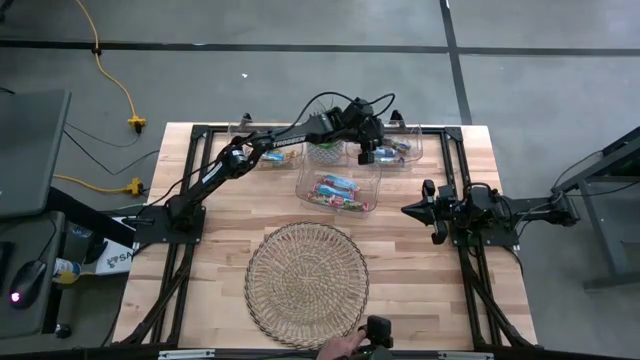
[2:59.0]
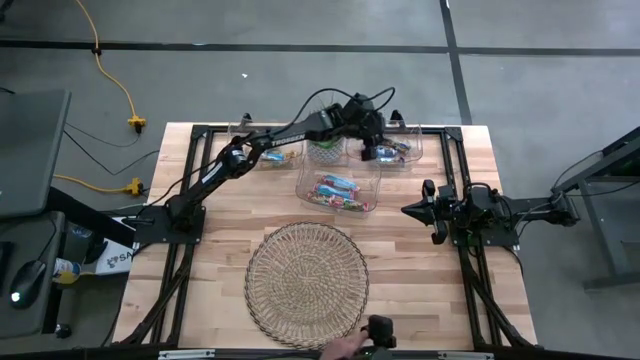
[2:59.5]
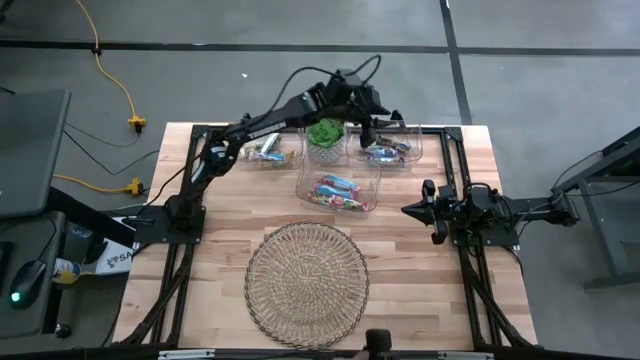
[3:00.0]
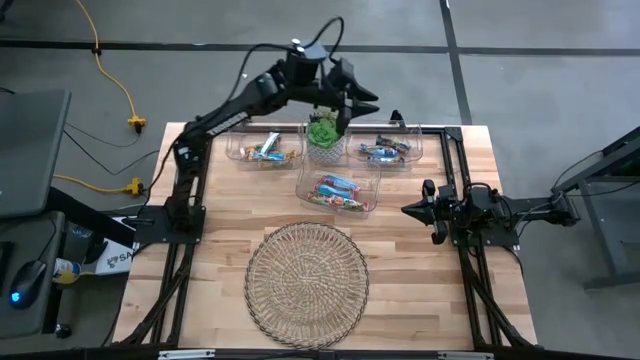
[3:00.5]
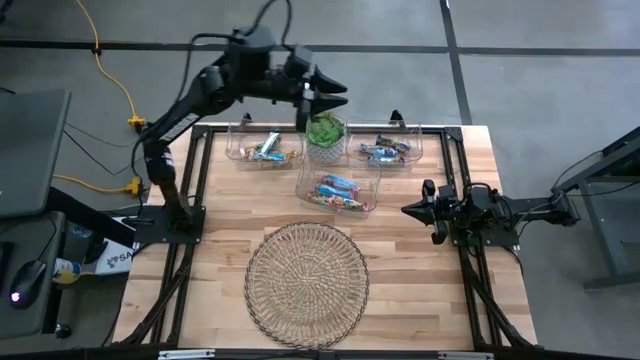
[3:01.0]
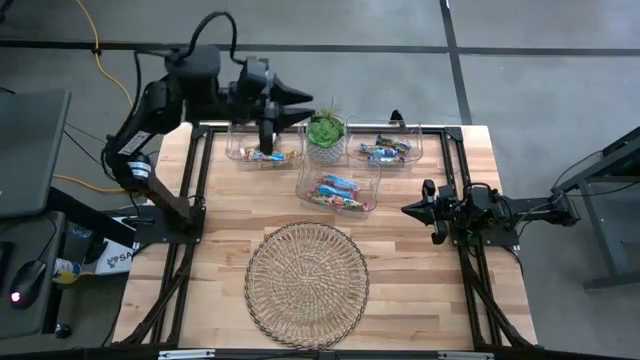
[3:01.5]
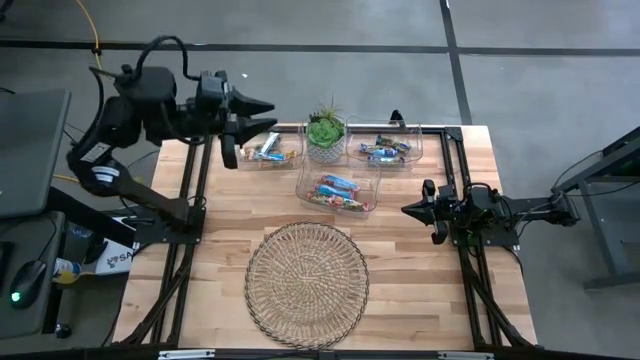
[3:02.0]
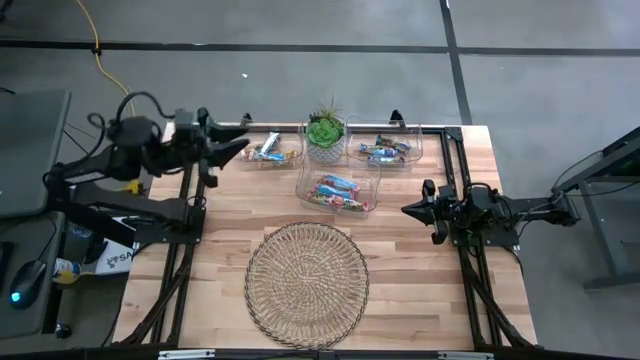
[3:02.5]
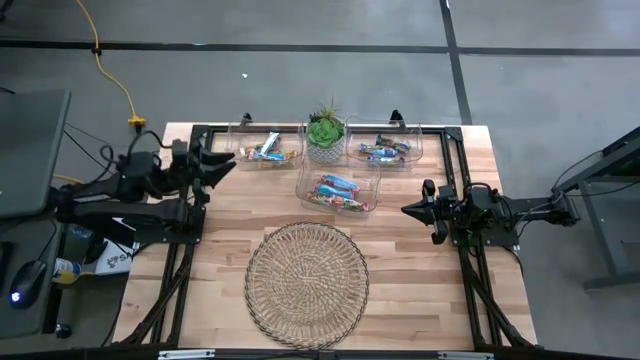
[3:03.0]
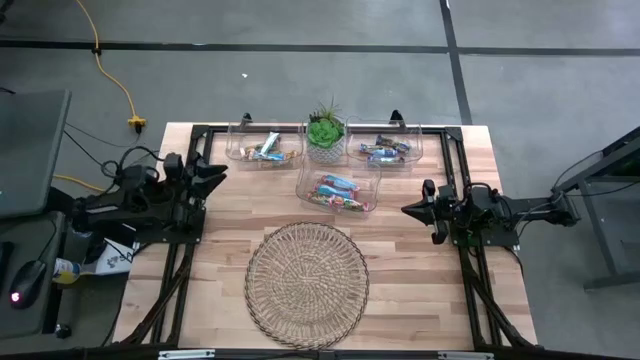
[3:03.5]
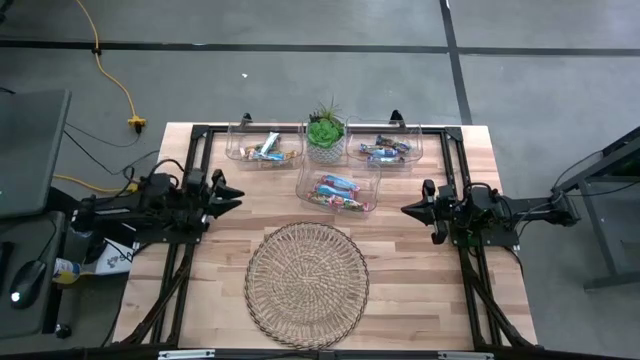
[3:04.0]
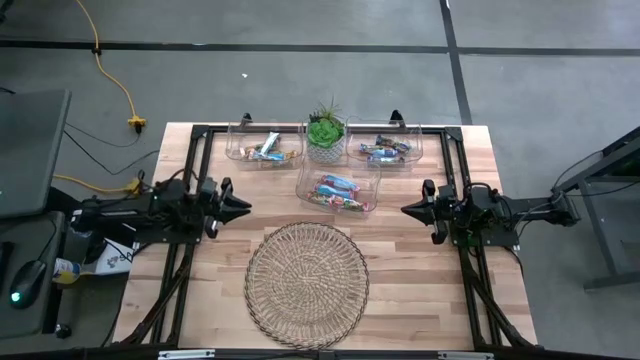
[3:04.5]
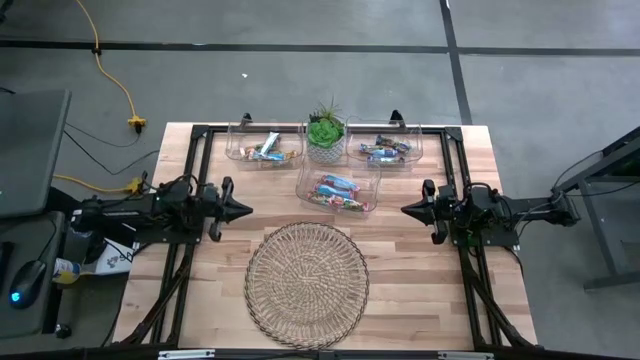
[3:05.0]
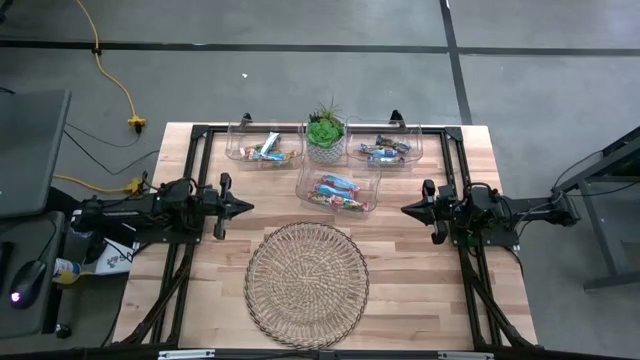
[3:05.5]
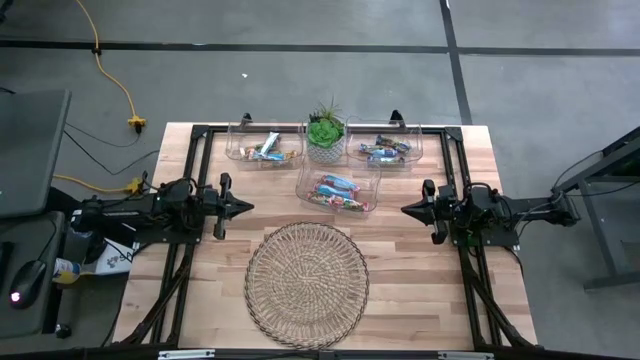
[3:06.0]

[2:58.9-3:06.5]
Task: Pick and place Granola Bars by type
Return to Home Position

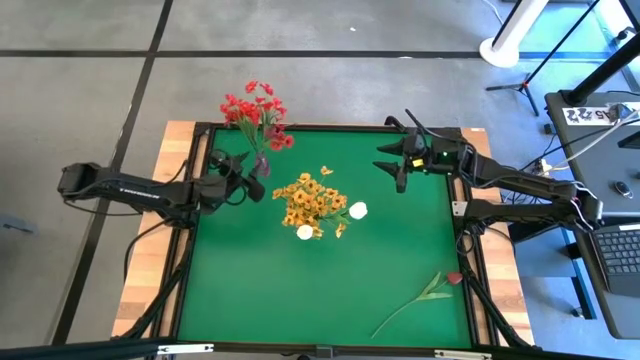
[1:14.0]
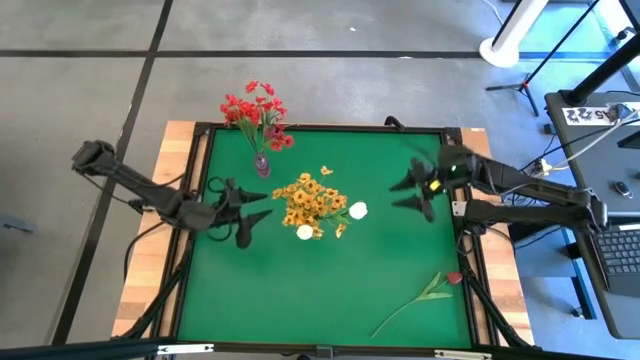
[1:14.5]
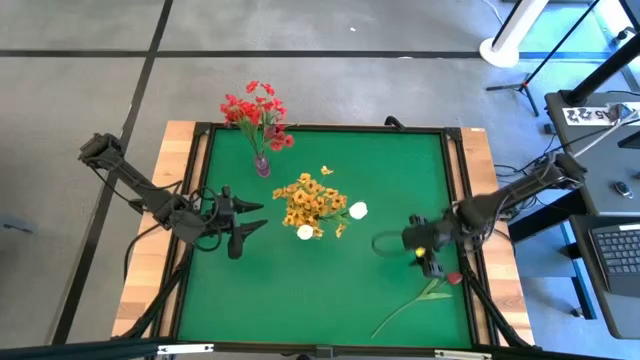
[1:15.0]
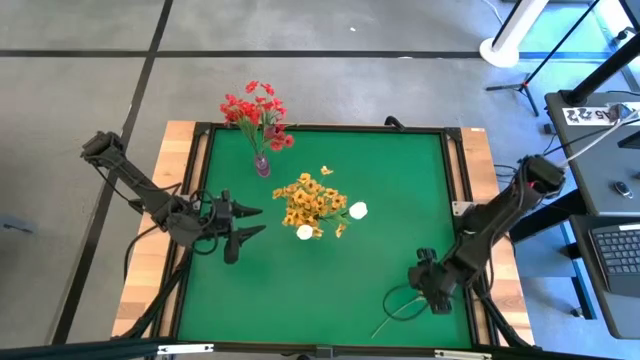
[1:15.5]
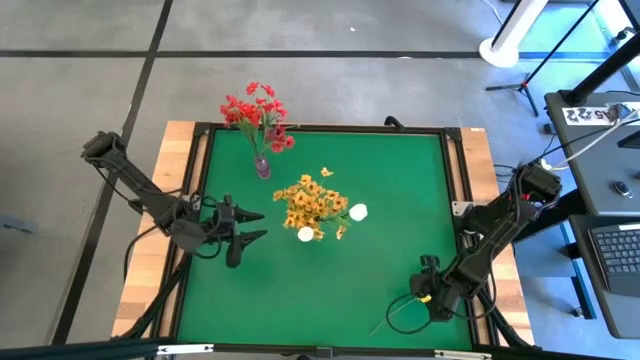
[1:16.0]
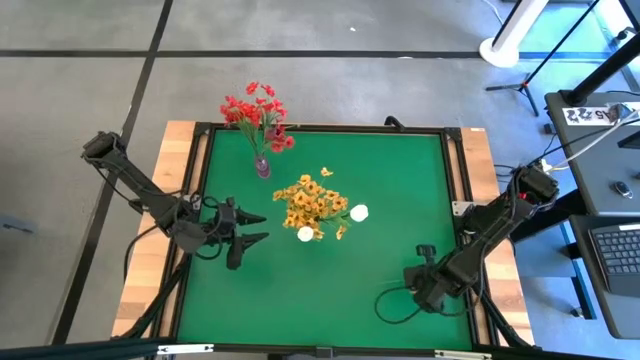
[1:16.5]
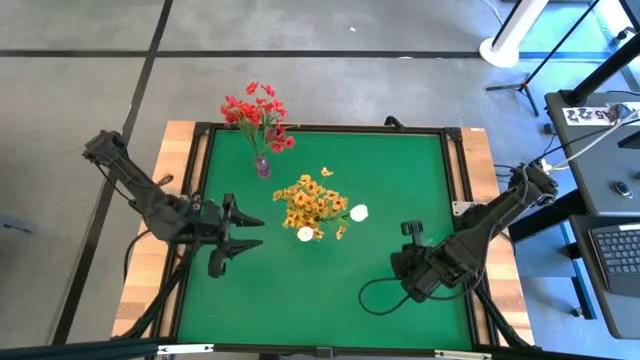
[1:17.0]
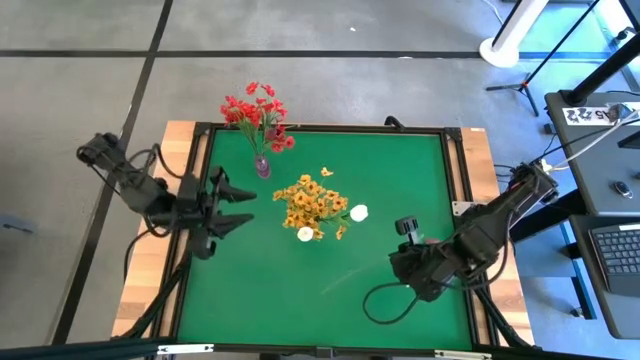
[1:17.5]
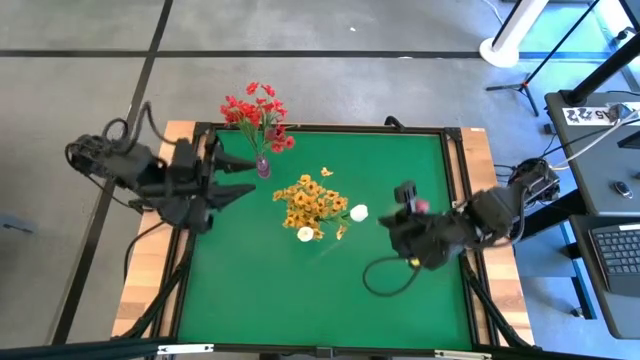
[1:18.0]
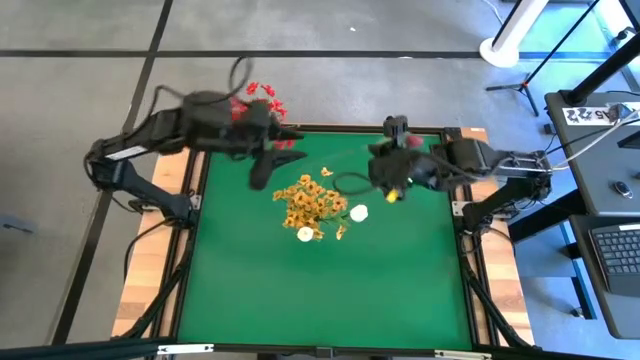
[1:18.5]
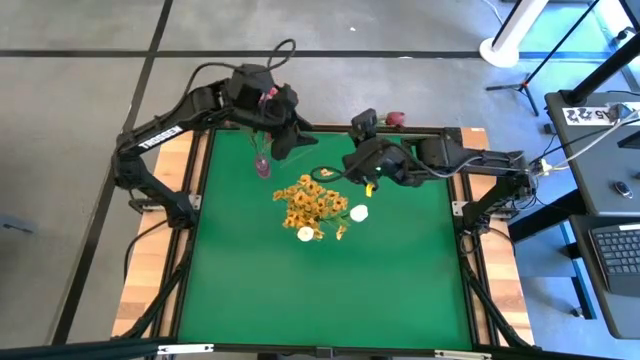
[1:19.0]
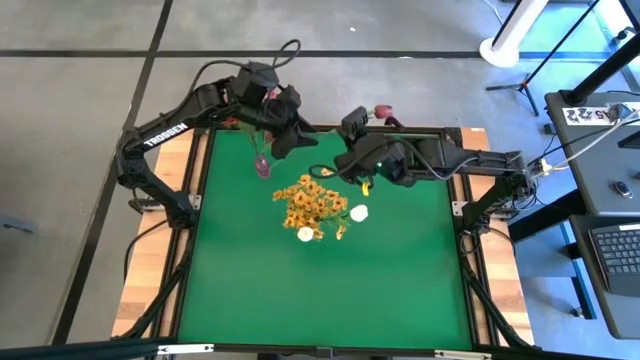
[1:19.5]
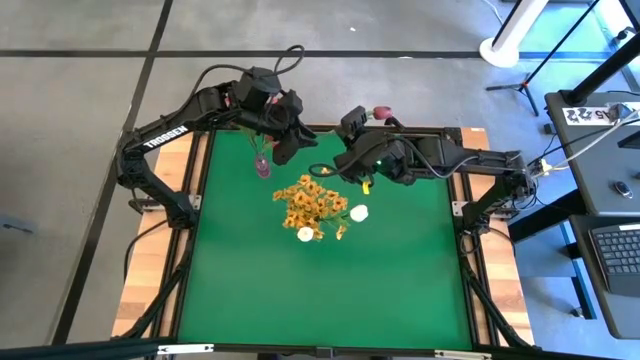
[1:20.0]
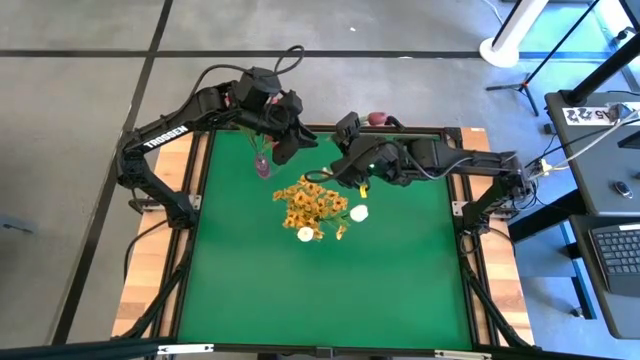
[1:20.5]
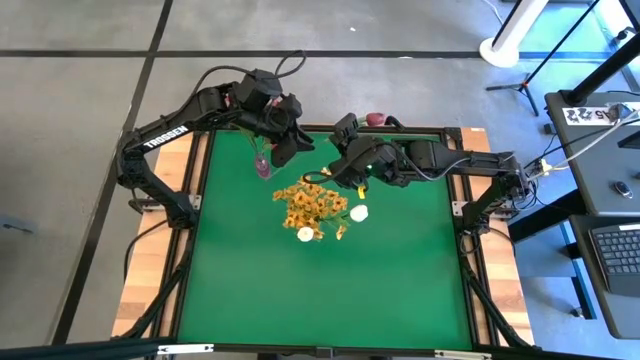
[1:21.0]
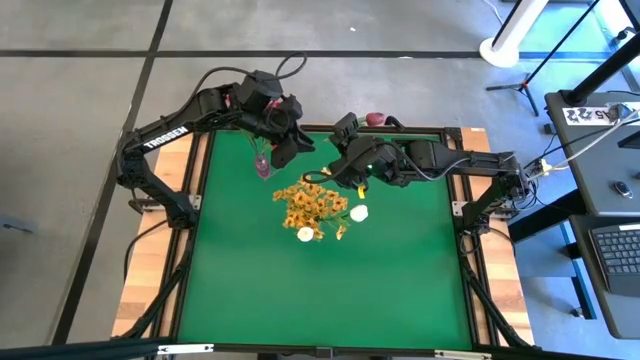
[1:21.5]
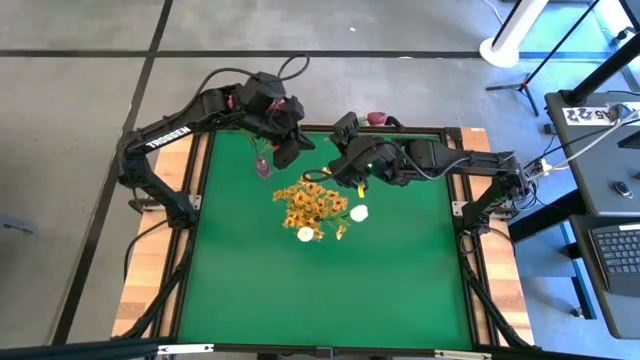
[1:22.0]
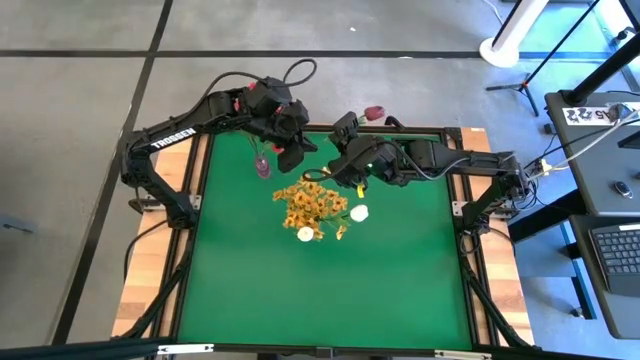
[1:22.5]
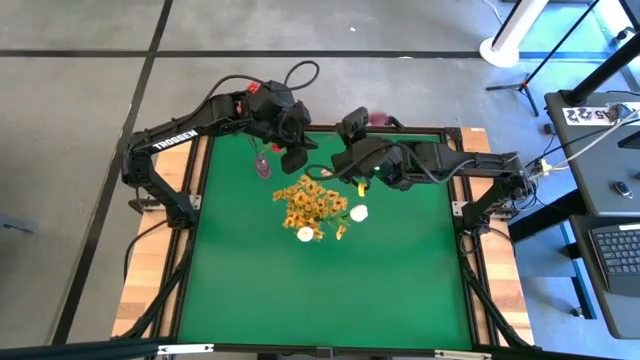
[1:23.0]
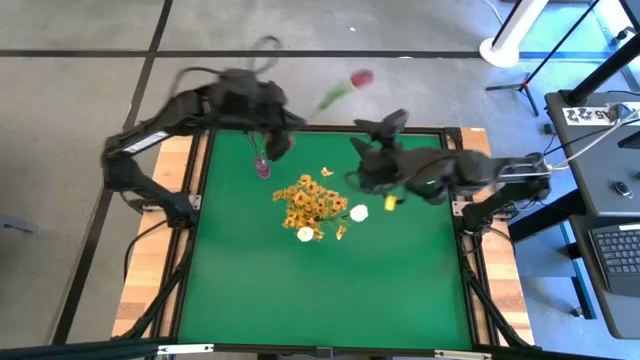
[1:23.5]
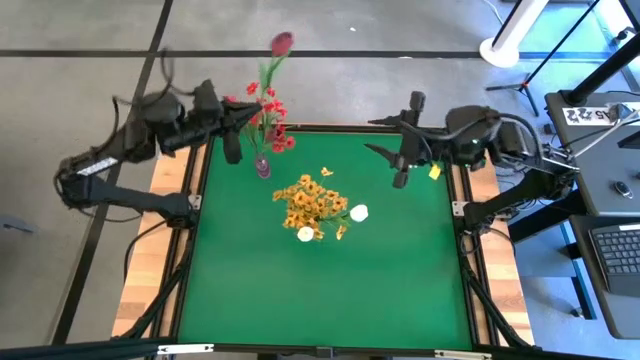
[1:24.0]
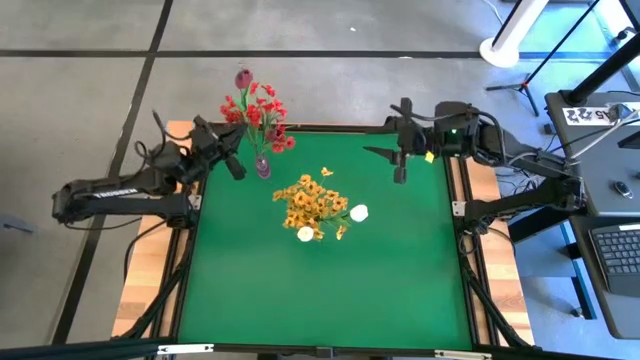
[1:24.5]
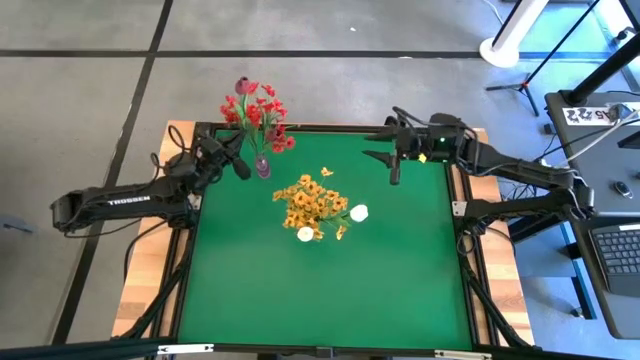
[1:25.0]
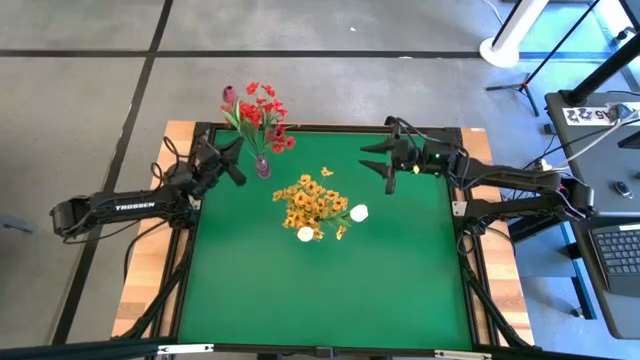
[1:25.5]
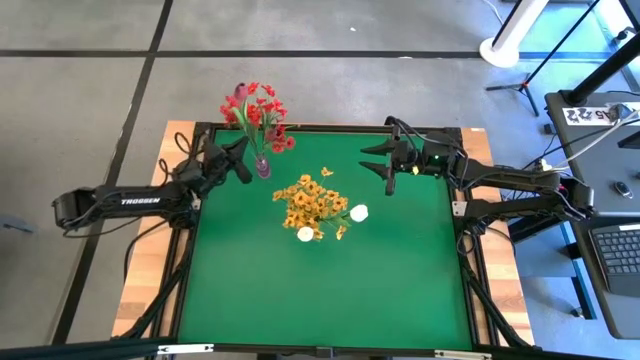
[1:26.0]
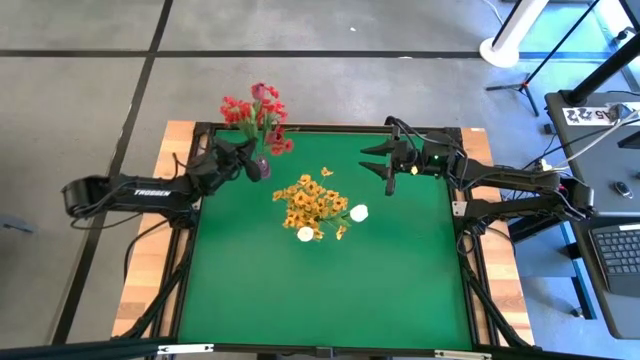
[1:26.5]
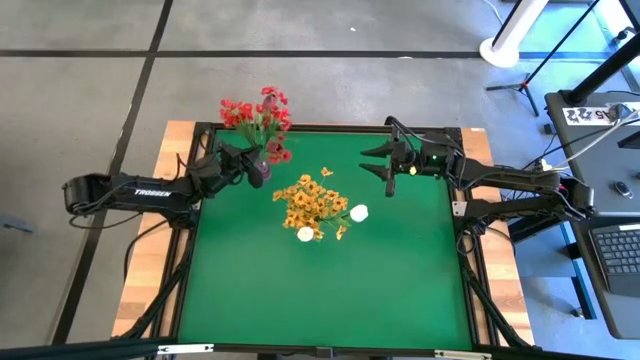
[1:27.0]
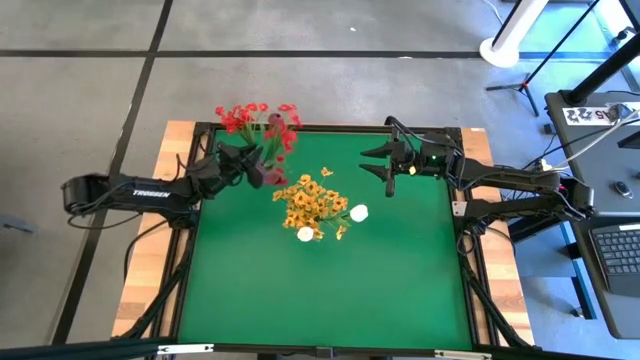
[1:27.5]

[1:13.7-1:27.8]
Task: Sort flowers into vase by color
Put the red tulip into the violet vase
